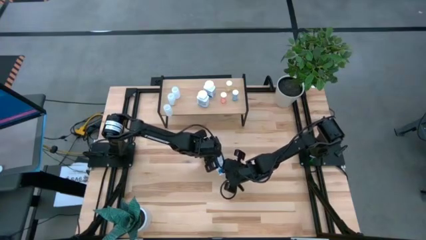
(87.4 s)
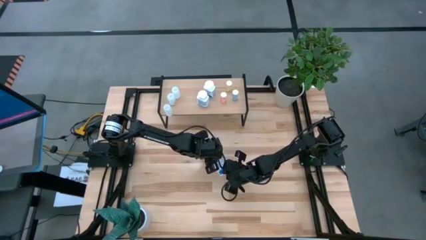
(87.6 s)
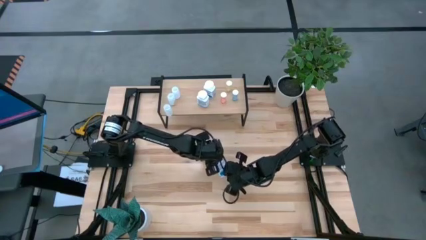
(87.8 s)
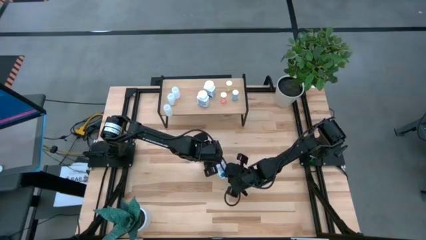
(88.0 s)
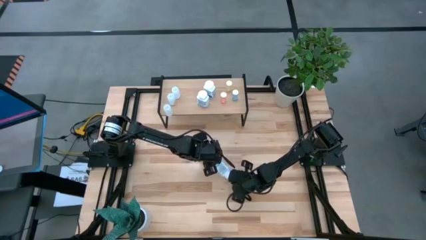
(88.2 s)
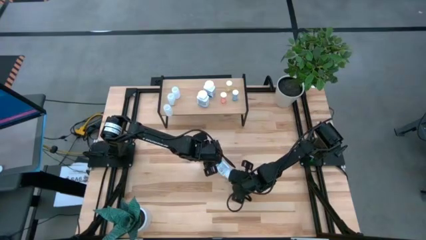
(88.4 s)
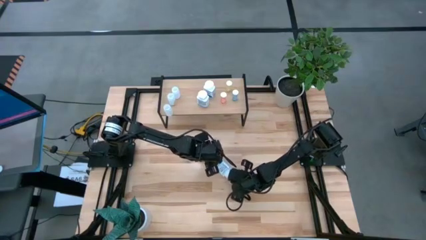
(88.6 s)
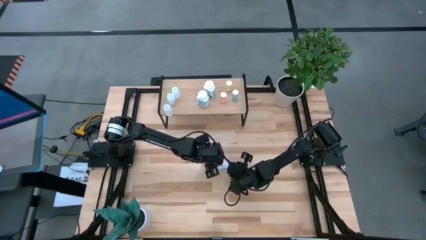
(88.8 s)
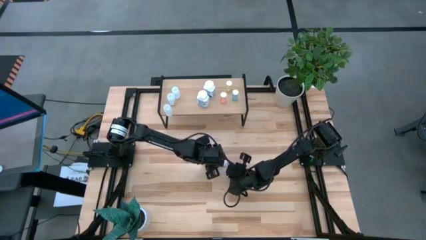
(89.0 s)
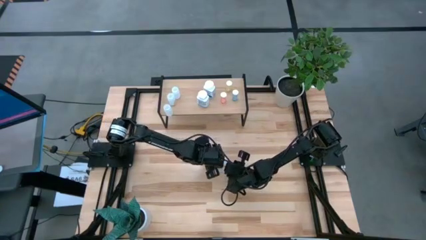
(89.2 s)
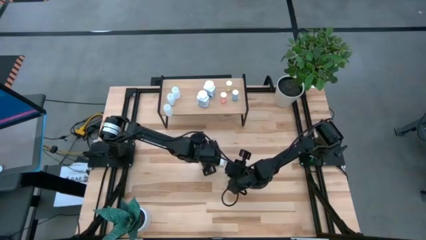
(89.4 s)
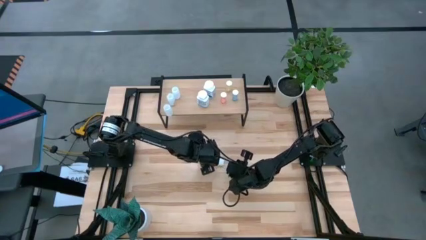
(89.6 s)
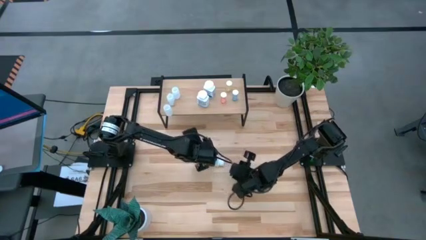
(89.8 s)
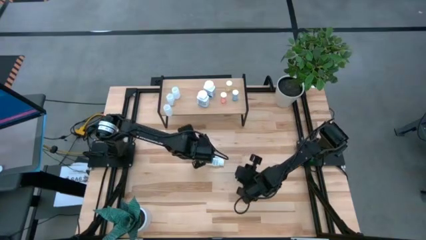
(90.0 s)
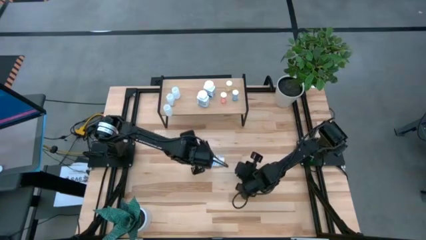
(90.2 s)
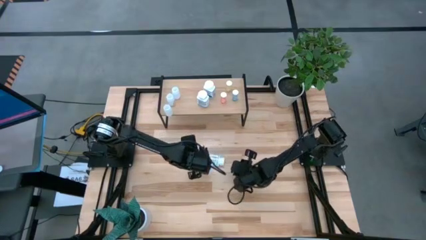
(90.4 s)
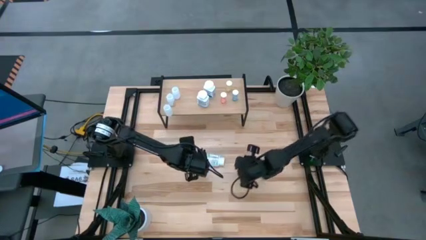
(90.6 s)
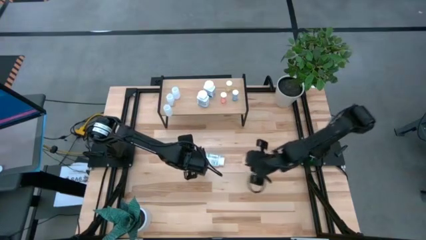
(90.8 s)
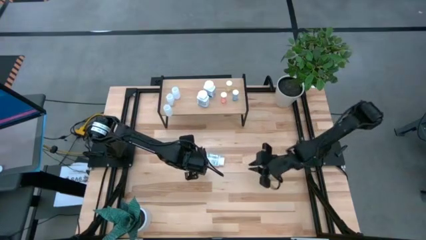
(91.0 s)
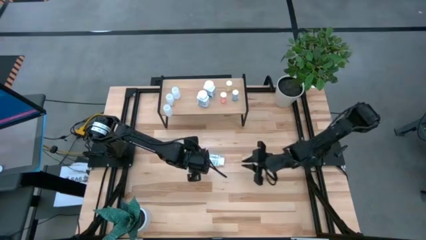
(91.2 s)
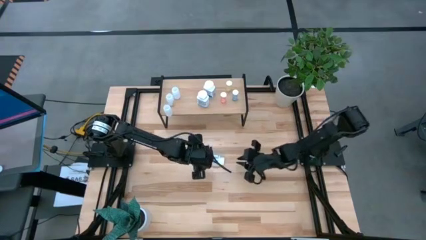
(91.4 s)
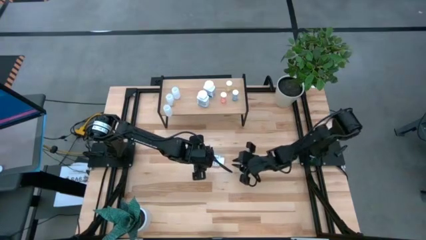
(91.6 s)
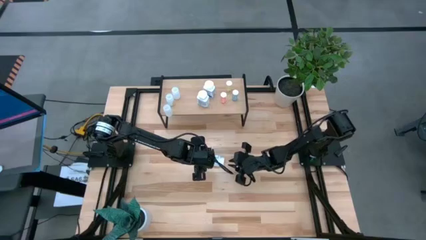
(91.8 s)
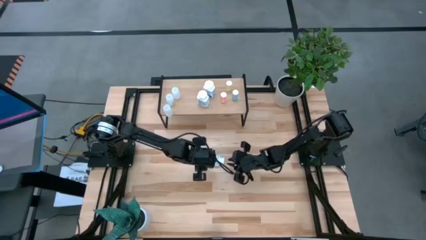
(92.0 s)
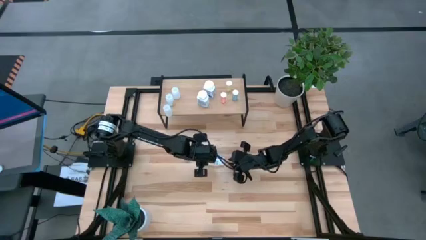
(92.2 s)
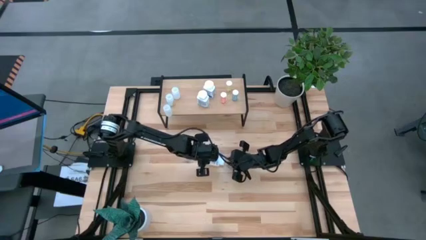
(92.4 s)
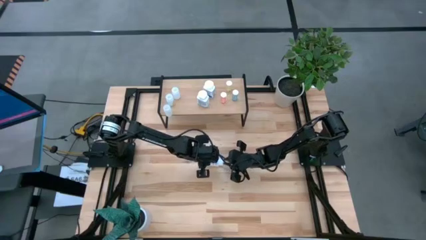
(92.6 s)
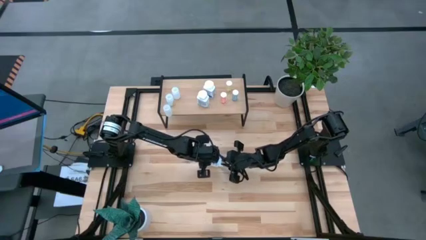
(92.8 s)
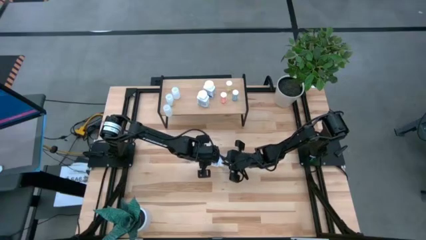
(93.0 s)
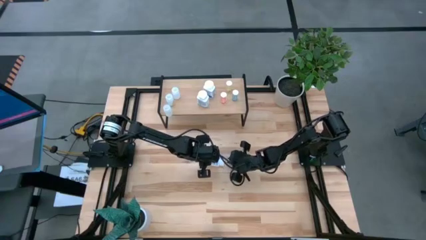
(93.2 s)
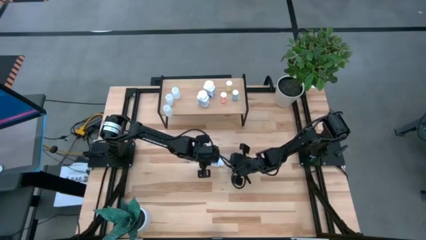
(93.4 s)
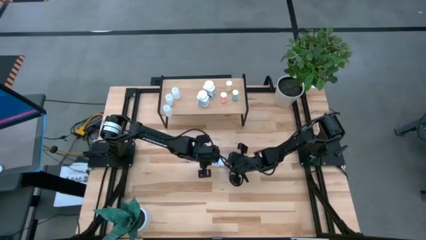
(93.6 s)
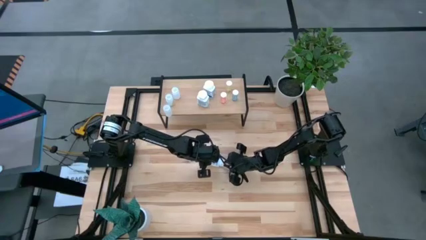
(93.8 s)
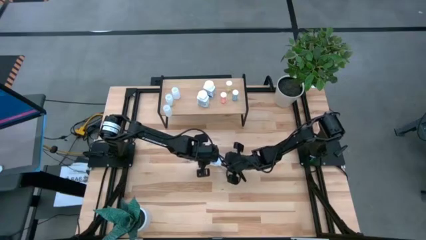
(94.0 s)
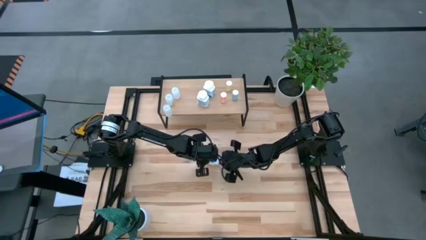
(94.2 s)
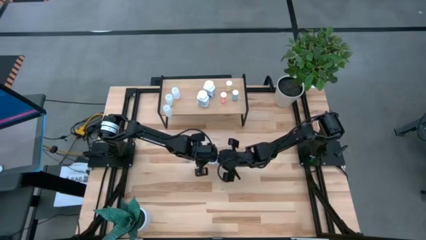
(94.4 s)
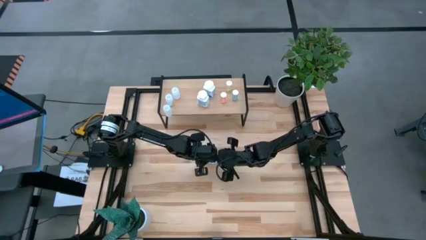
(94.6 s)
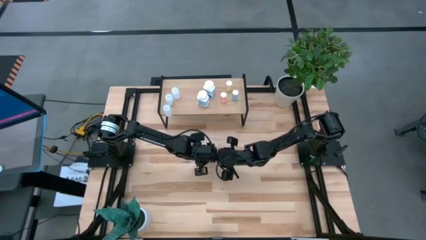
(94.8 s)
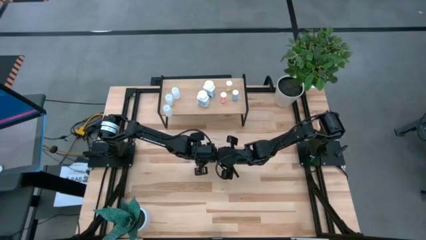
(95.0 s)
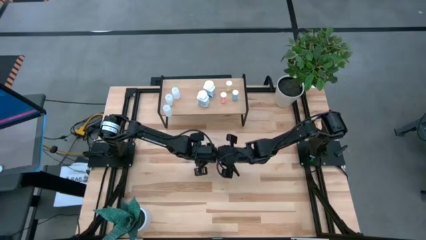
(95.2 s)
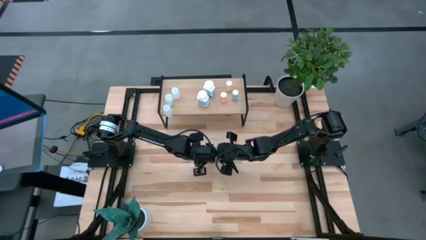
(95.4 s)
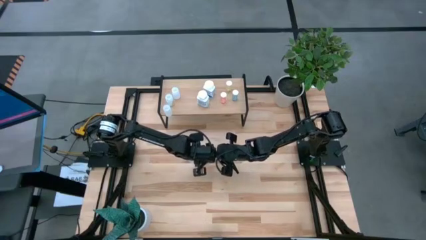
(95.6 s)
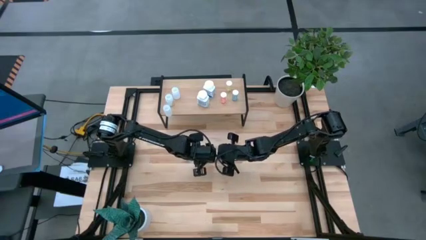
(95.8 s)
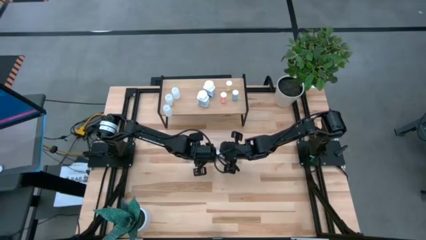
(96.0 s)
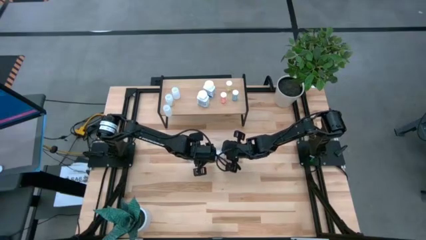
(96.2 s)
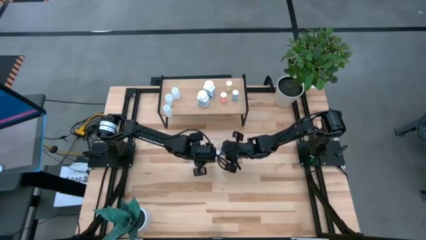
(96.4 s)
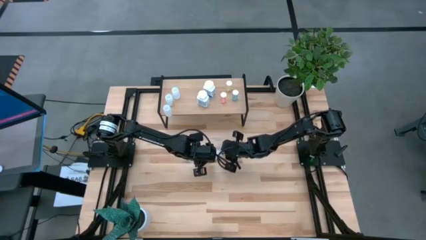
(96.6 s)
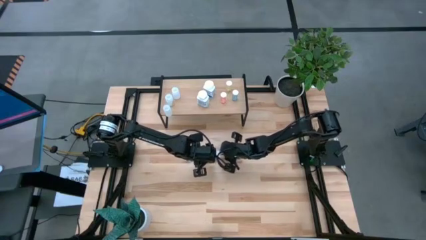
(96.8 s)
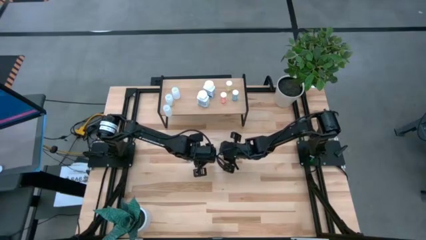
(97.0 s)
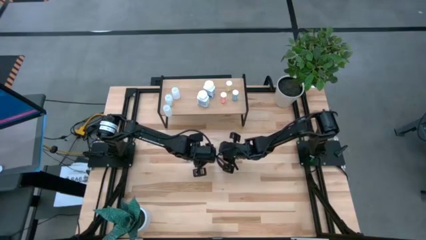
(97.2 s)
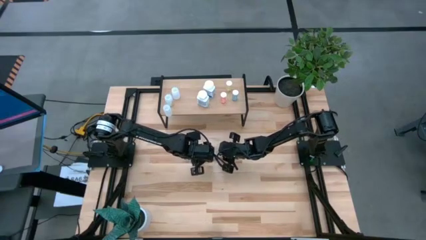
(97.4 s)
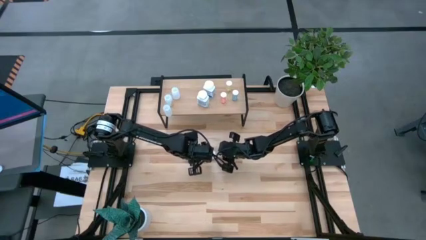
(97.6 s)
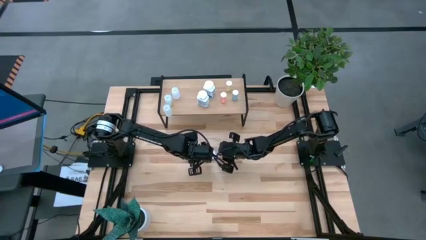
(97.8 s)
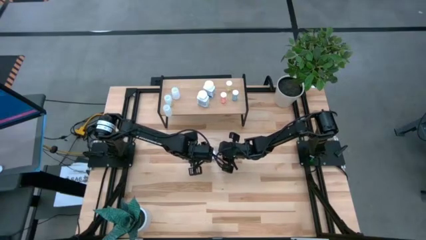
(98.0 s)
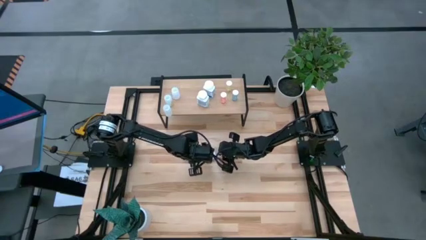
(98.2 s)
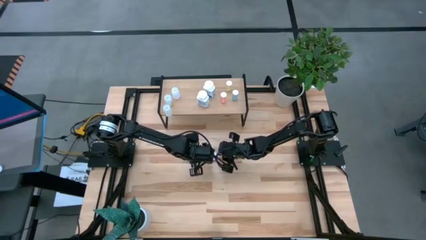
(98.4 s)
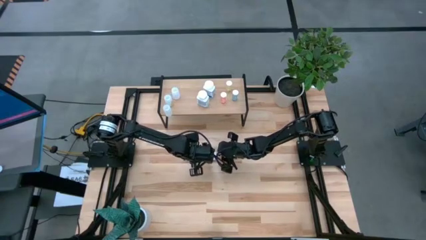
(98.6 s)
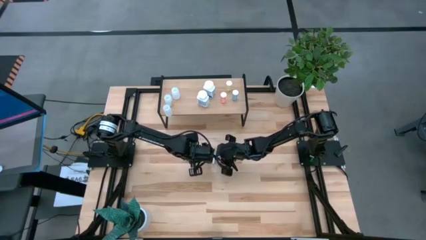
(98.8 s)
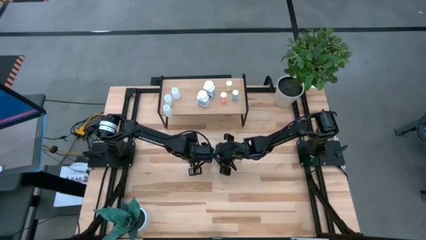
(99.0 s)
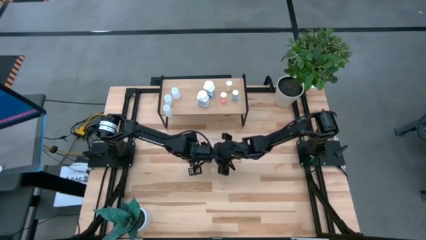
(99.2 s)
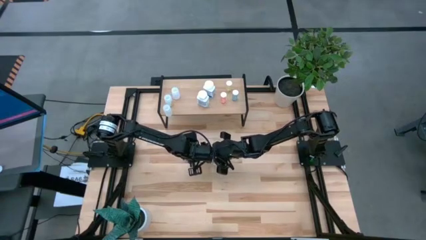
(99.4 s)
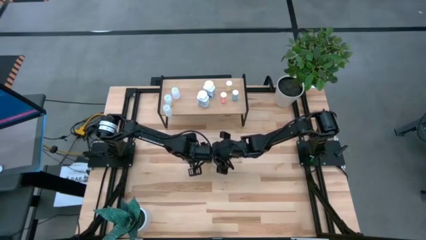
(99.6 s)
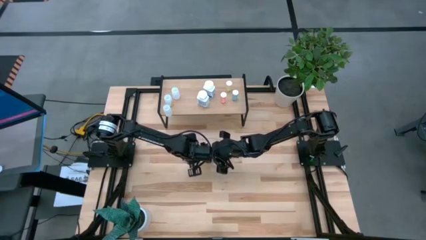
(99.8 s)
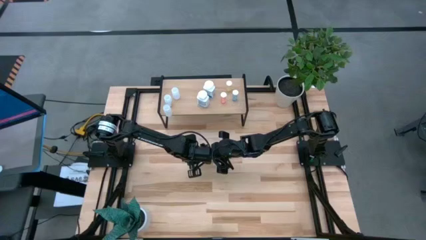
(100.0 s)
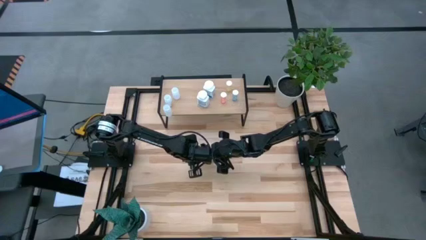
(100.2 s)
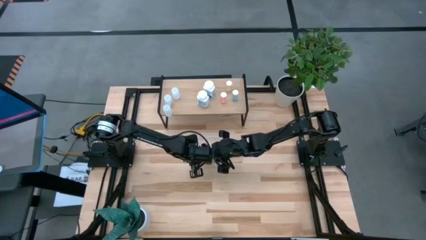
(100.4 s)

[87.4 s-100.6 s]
Task: Pick and place medicine bottles onto shelf by color
Put the white pill bottle on the shelf

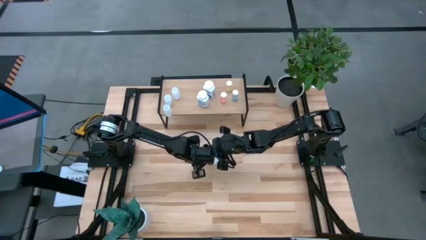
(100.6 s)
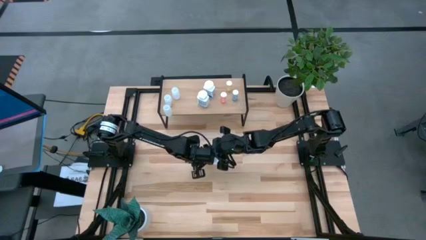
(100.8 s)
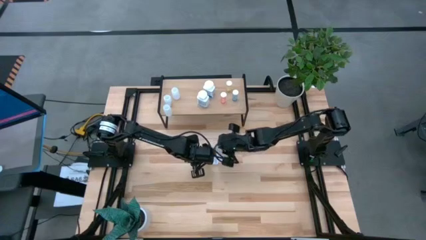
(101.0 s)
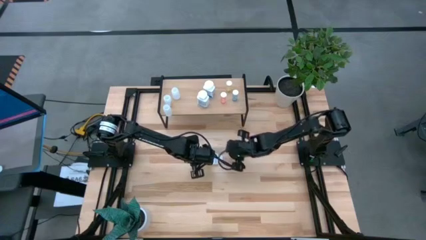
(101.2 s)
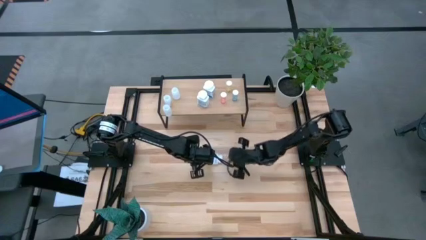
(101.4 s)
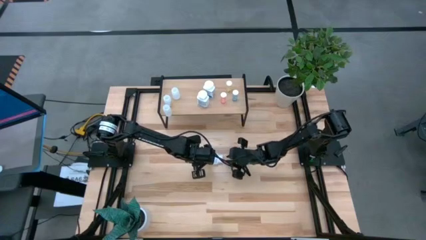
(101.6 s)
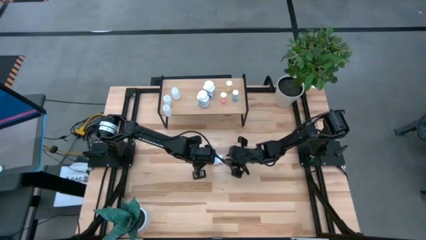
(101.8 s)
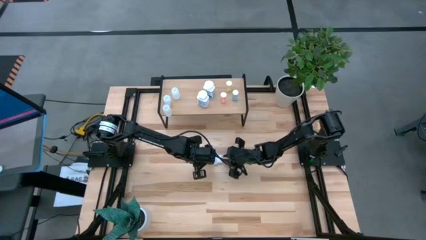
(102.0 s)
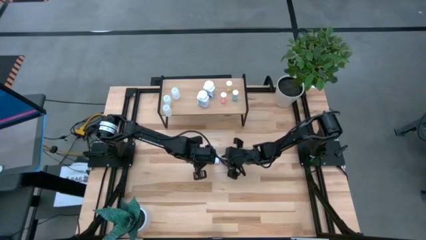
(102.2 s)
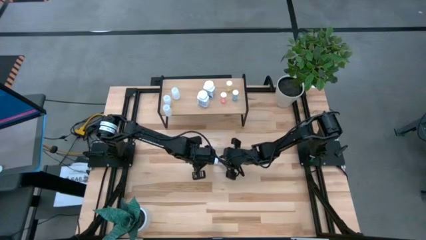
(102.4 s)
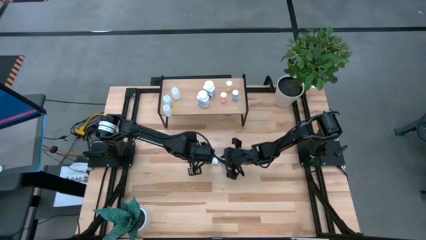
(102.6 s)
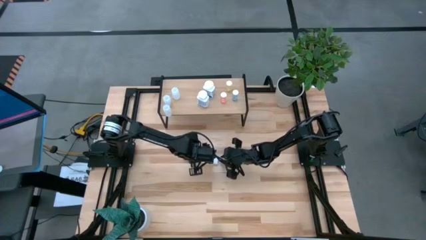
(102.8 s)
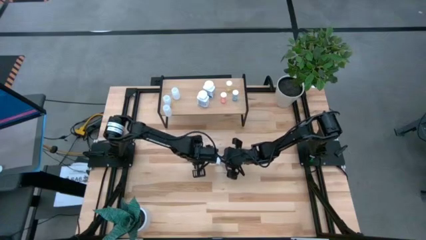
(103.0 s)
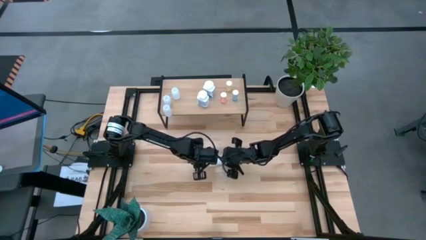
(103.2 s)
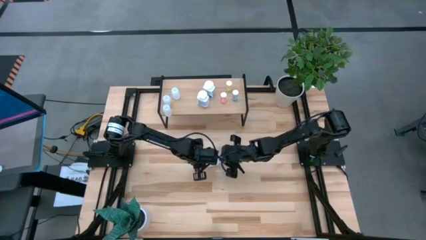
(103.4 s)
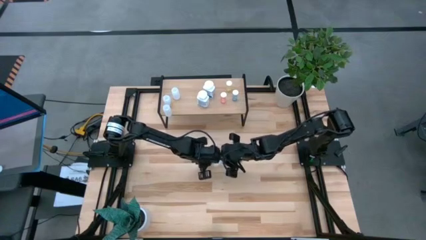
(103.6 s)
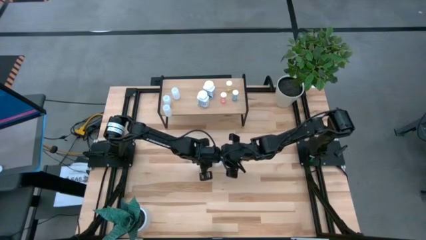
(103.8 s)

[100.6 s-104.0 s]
Adjust the white pill bottle
